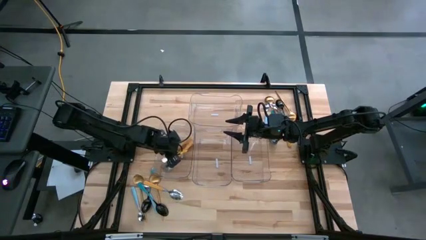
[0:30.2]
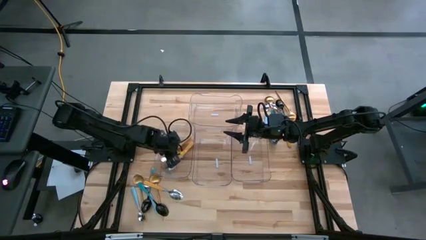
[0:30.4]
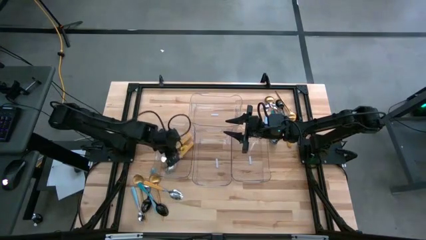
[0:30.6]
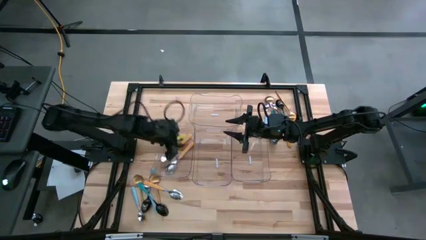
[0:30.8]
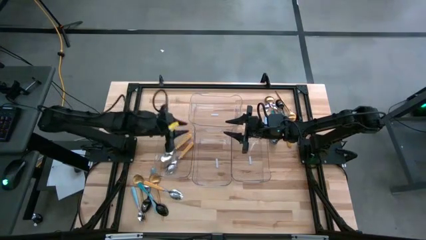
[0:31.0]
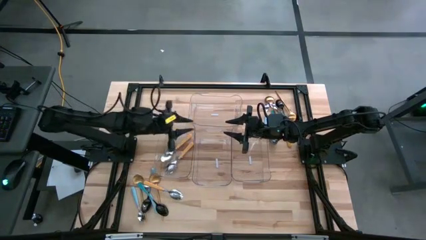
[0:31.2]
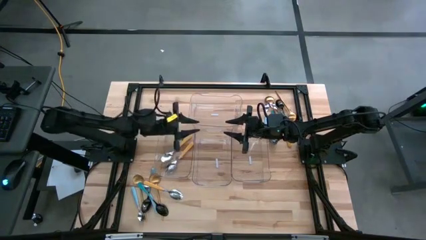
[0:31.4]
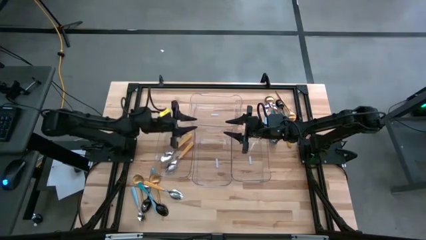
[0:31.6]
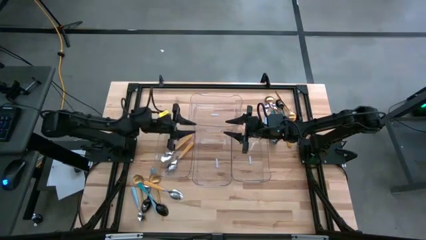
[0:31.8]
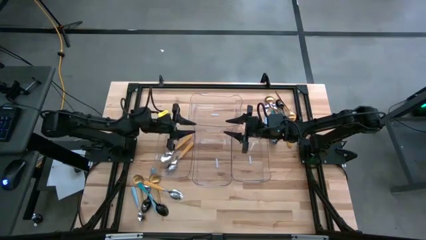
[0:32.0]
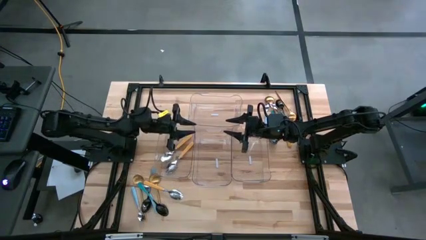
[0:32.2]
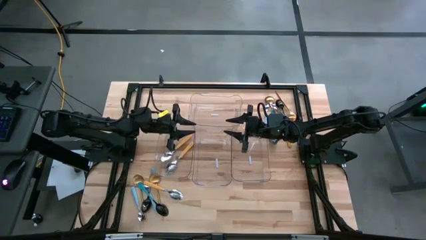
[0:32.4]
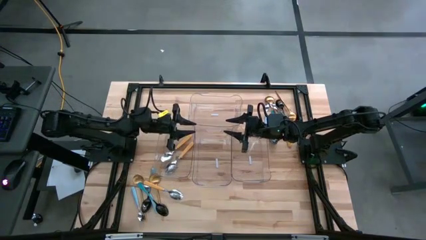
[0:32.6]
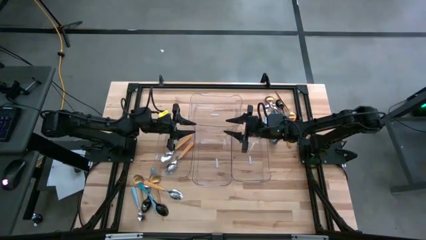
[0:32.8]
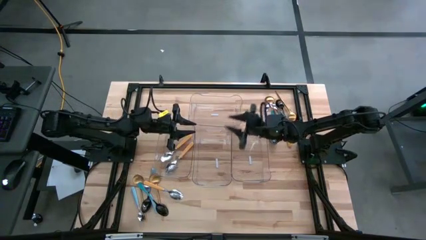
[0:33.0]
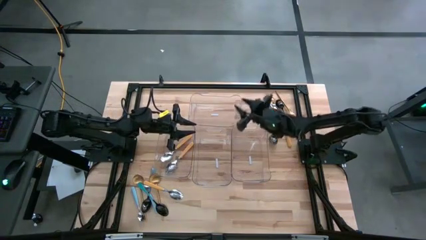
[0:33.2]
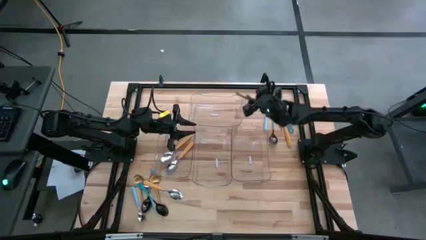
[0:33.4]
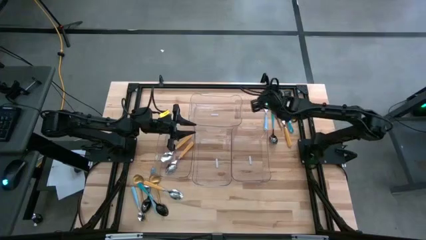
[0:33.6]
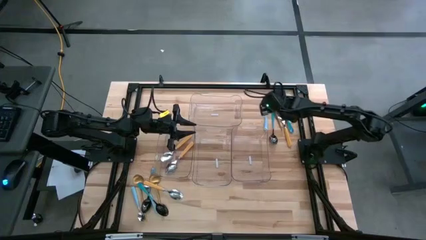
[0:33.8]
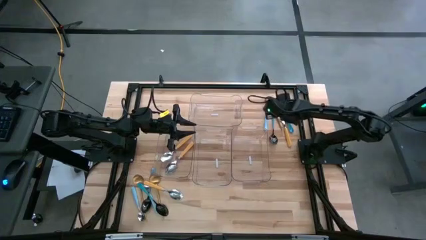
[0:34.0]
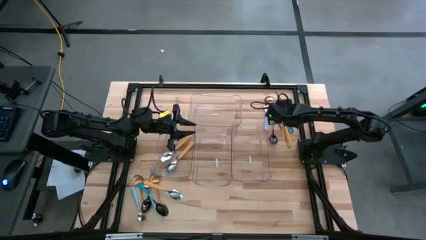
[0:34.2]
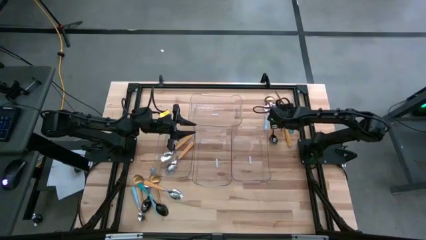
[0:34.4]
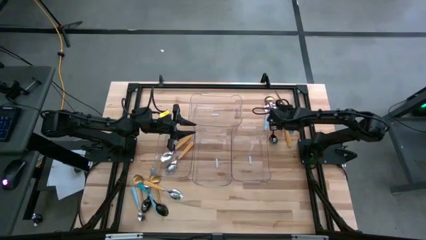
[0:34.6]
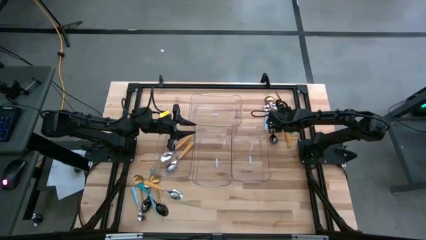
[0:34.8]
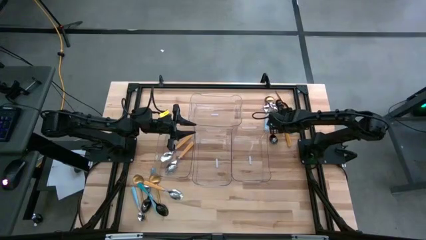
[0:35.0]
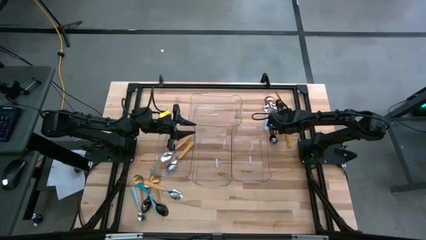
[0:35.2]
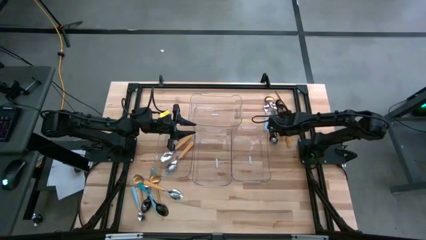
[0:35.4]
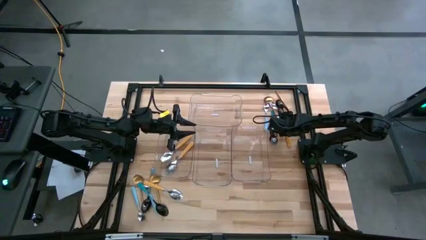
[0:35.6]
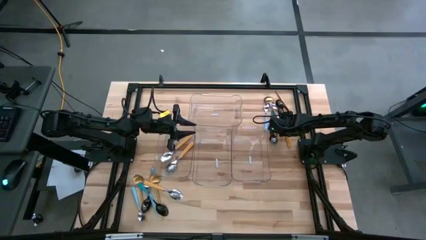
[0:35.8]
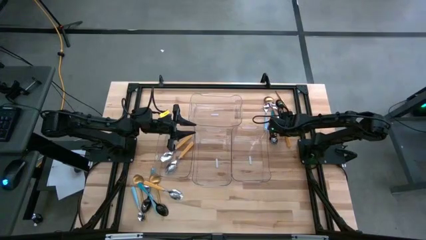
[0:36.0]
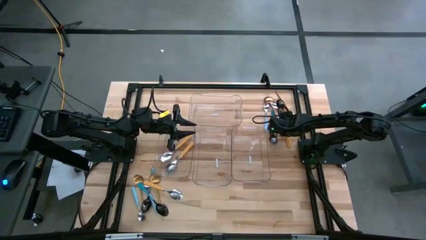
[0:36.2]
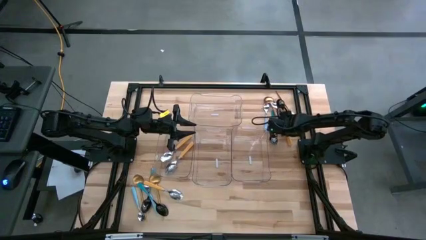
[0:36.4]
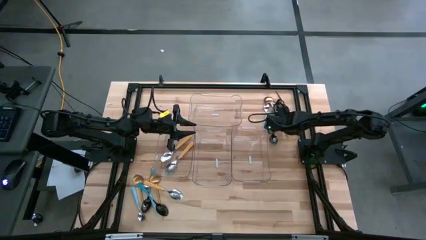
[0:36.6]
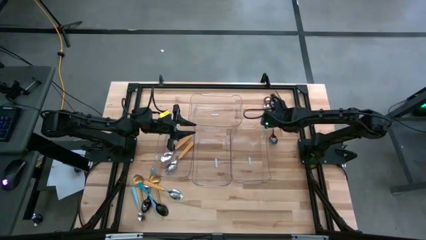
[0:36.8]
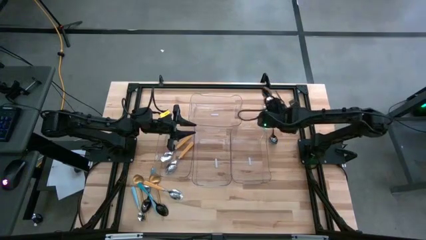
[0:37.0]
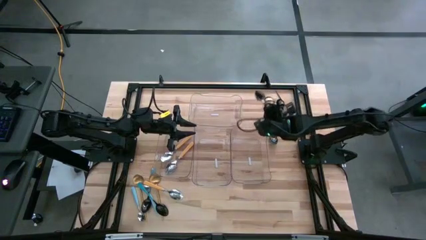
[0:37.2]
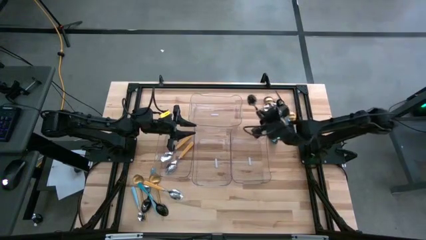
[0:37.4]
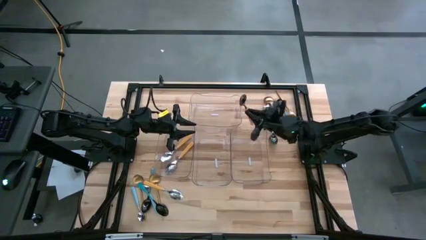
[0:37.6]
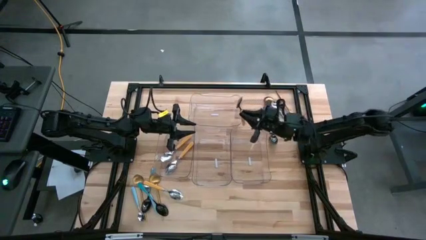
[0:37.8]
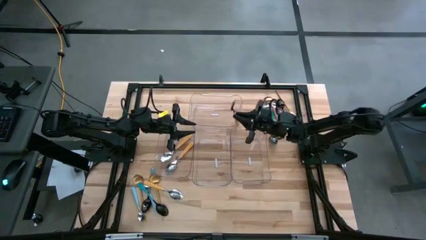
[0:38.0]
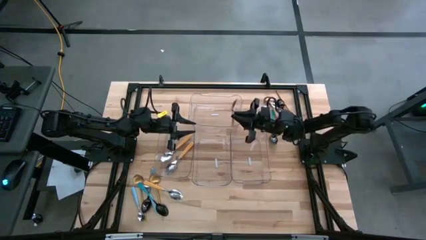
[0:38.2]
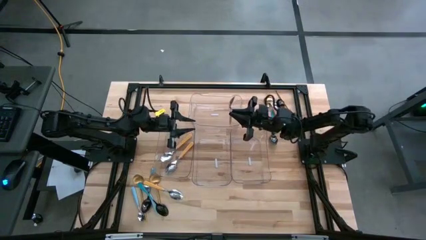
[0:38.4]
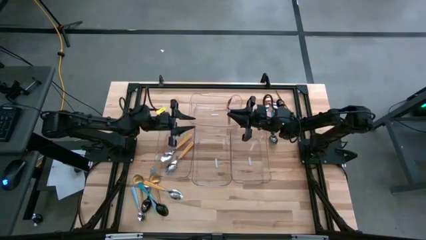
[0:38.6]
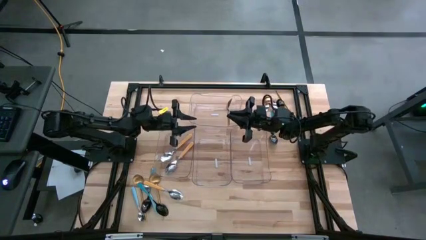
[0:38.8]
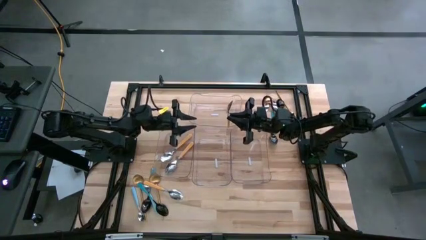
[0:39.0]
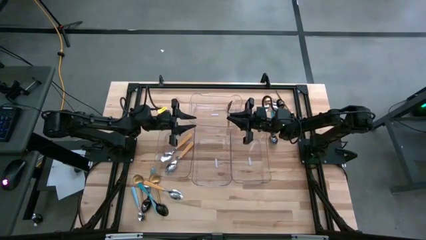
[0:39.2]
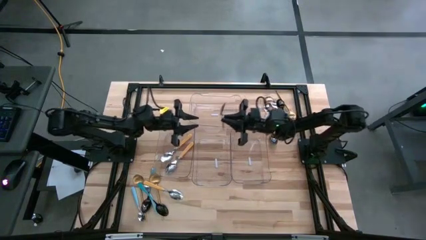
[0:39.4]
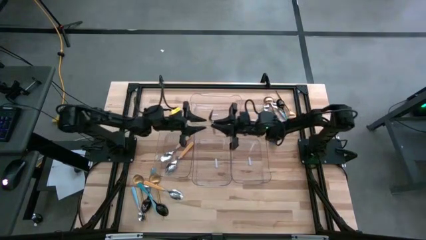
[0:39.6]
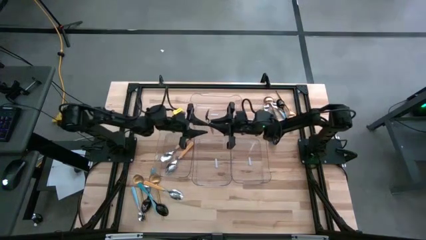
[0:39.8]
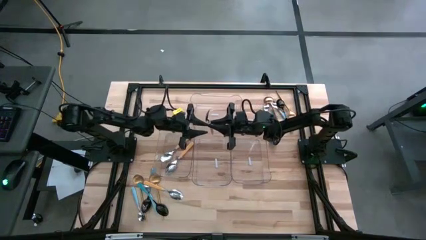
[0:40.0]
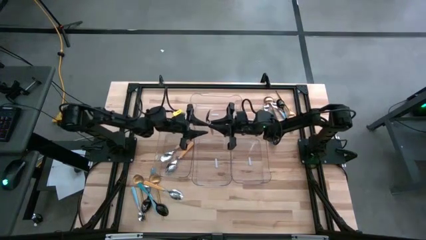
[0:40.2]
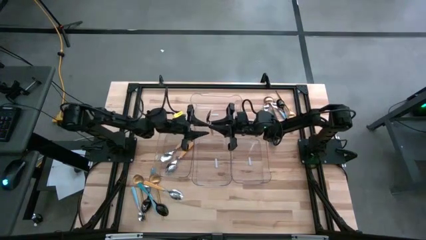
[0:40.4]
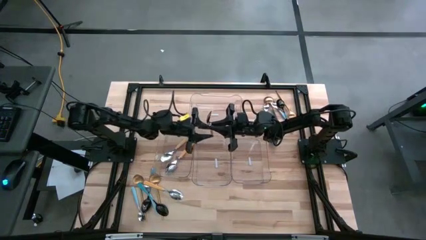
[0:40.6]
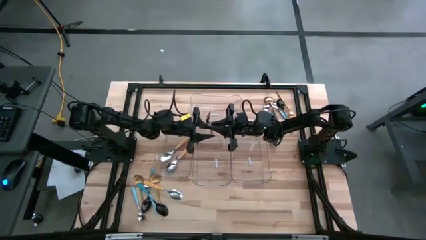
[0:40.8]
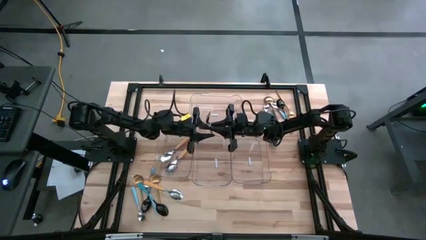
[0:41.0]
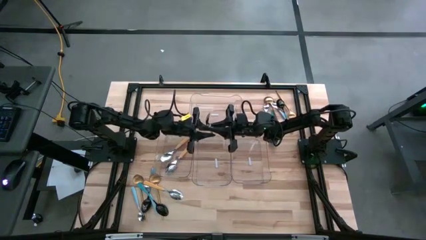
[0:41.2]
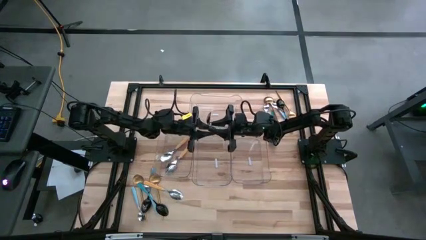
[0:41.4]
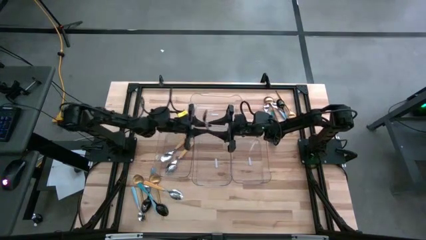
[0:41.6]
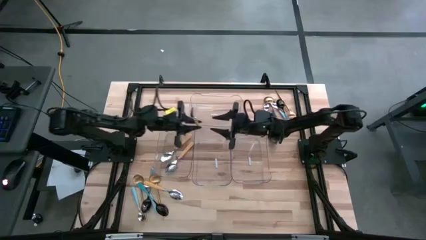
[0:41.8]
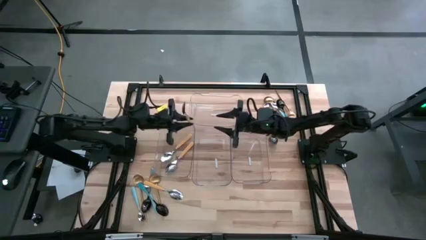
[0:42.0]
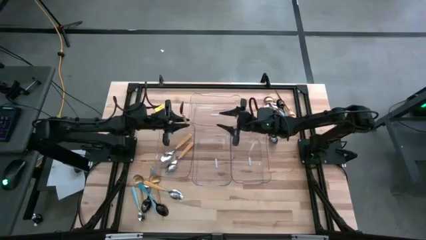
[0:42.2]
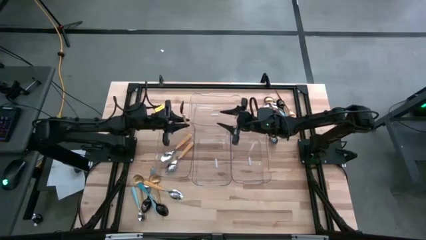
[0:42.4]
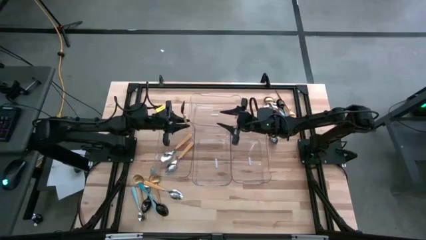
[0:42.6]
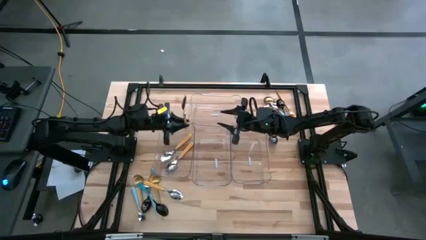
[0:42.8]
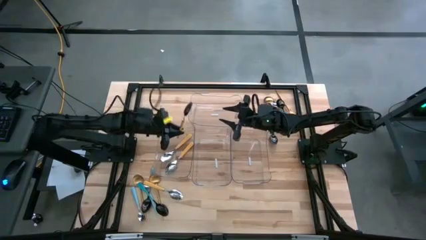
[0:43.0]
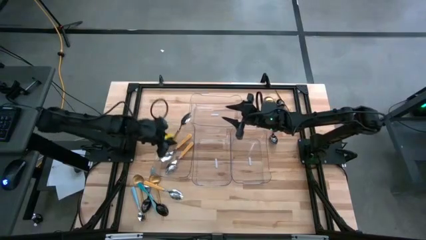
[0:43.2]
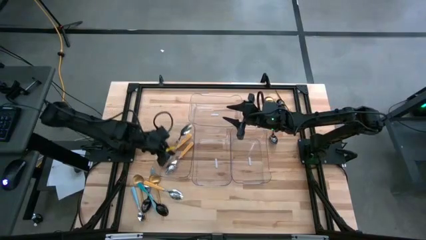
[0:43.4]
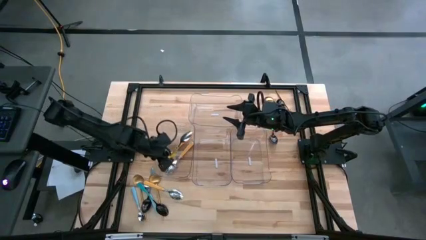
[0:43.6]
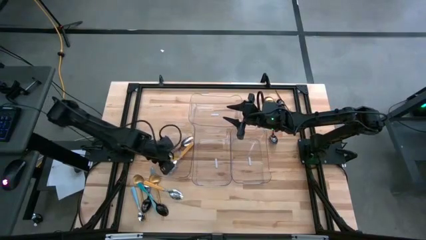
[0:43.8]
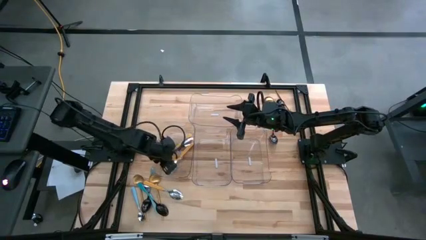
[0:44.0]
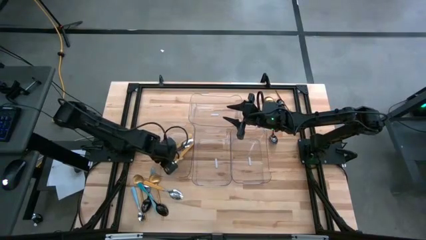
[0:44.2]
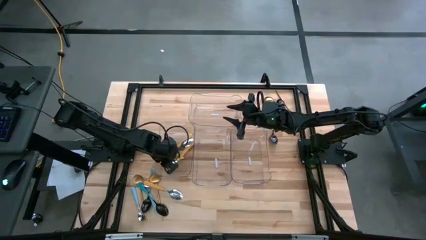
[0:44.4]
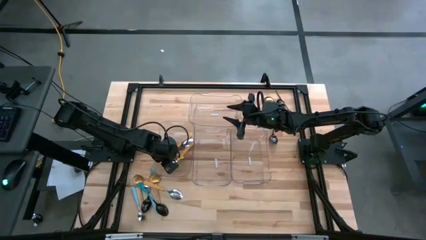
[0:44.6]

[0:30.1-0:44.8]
Task: Sort silverware by color (type)
Put the yellow spoon into the left transparent bin

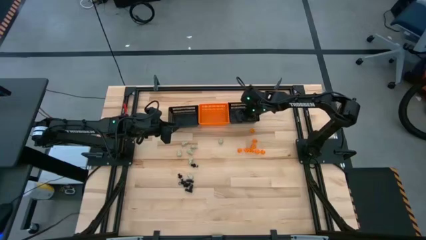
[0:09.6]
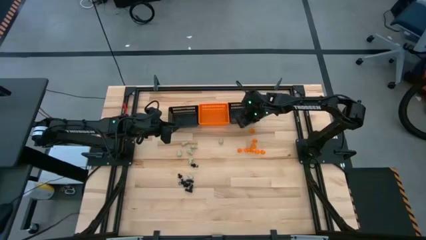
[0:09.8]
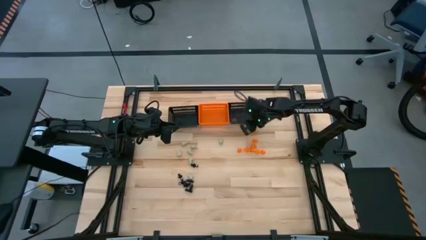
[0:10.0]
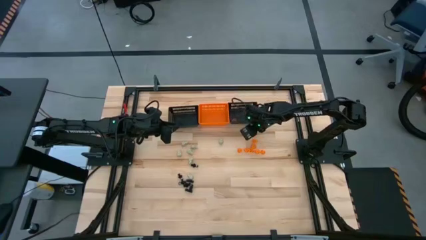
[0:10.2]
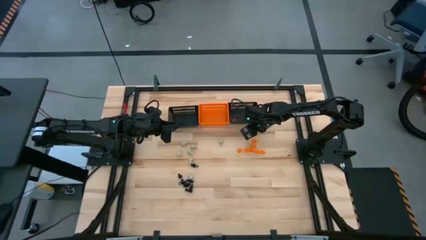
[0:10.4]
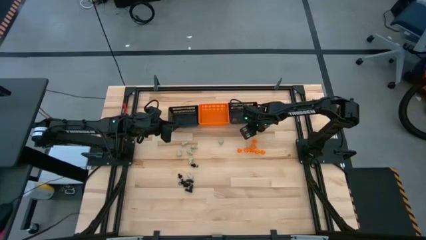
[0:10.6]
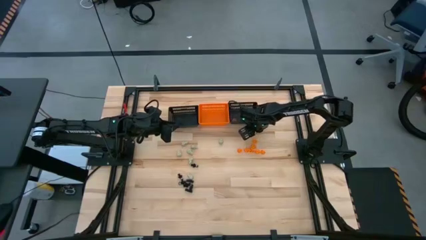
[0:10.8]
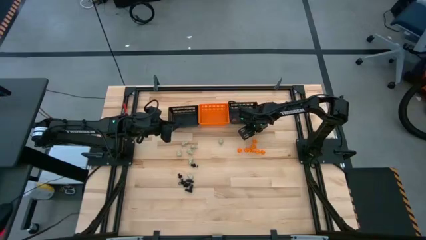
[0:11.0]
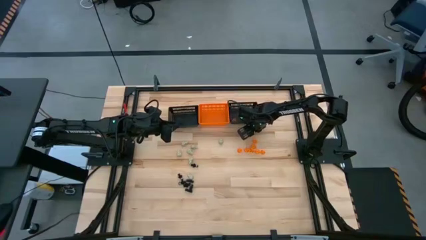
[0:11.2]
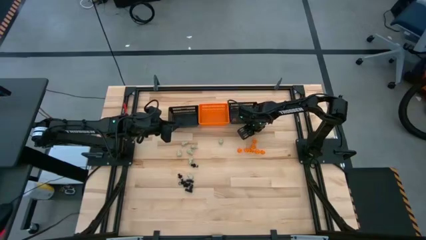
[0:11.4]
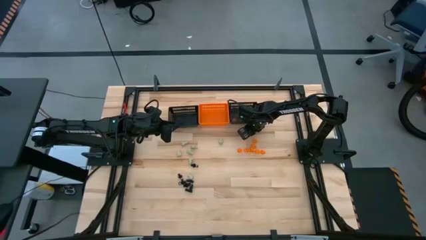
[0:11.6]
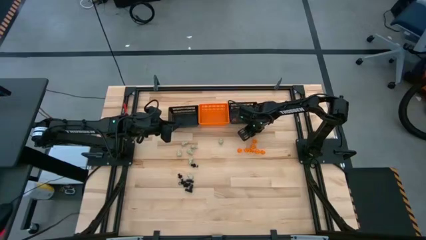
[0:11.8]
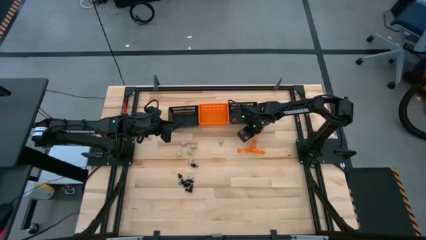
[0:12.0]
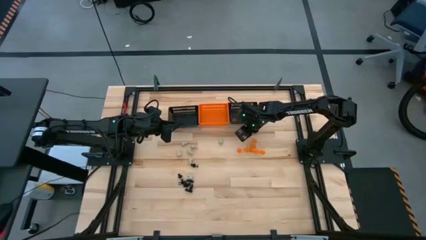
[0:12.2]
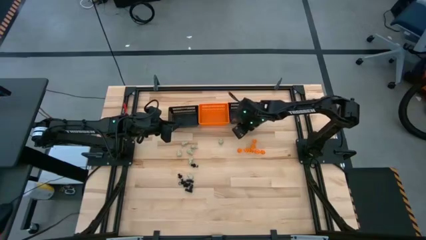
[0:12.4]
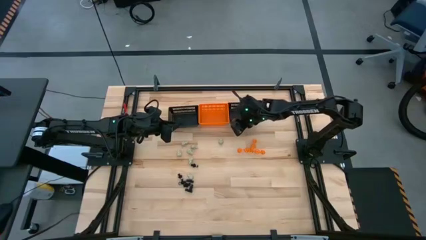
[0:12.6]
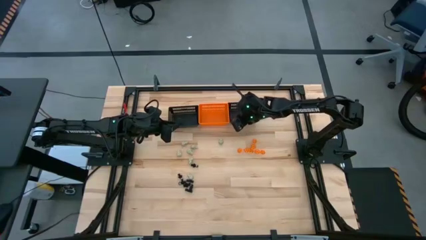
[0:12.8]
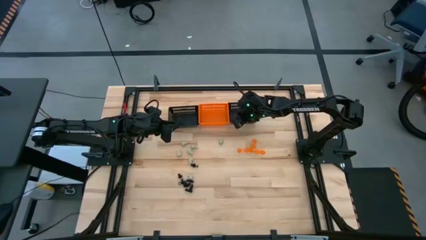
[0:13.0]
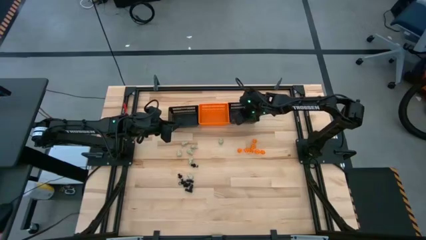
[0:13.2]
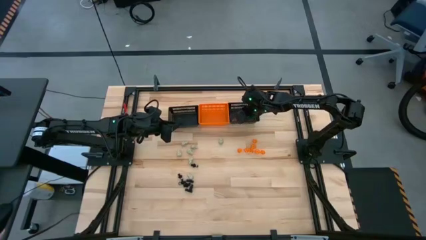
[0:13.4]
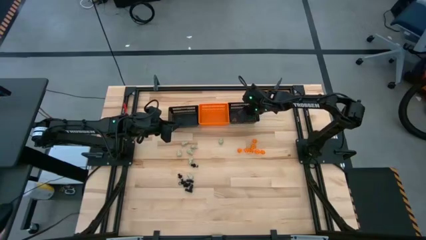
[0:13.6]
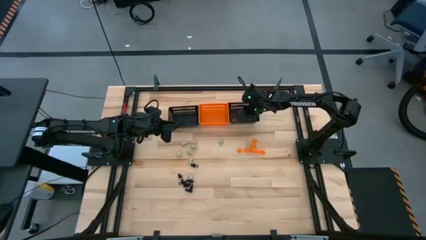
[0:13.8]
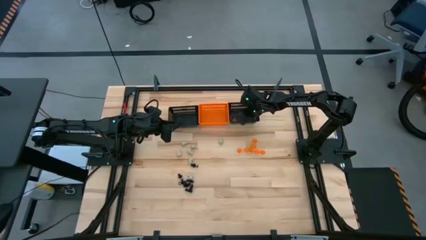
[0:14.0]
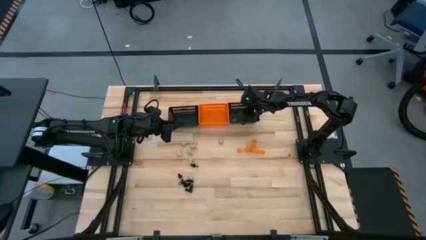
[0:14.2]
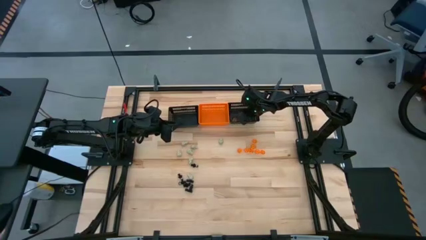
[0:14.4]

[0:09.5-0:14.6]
Task: Sort Halloween decoration
Put the orange pumpkin toy into the right black bin
